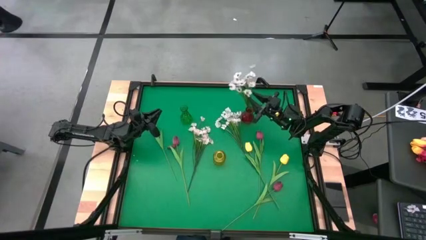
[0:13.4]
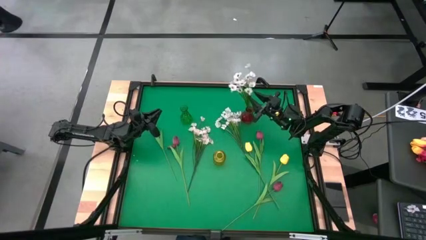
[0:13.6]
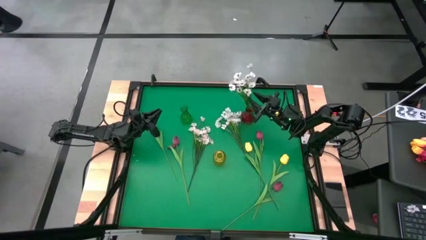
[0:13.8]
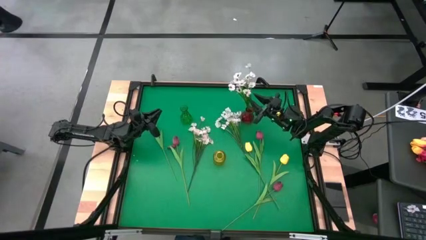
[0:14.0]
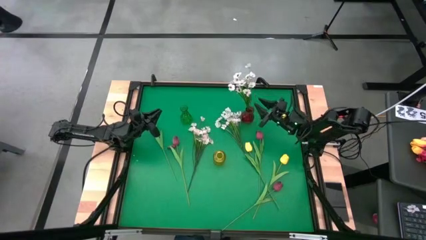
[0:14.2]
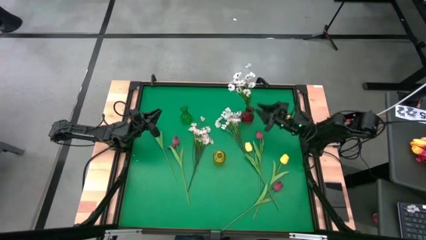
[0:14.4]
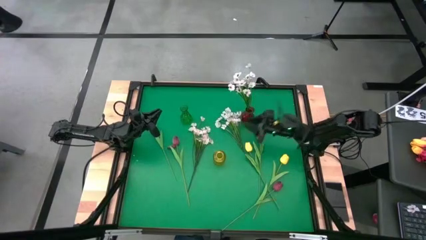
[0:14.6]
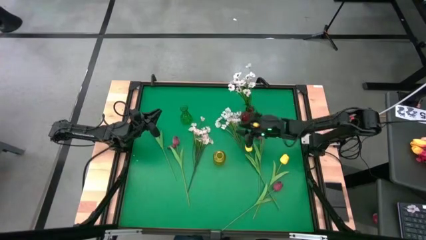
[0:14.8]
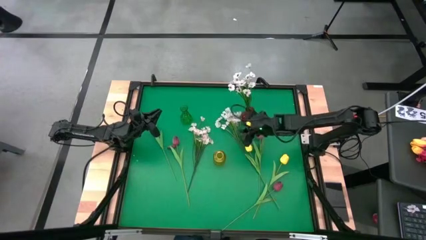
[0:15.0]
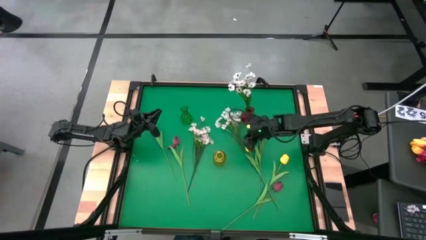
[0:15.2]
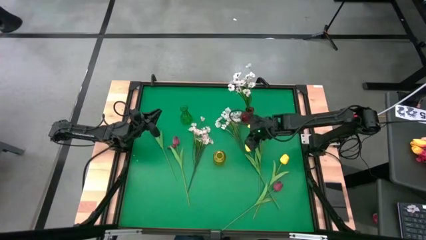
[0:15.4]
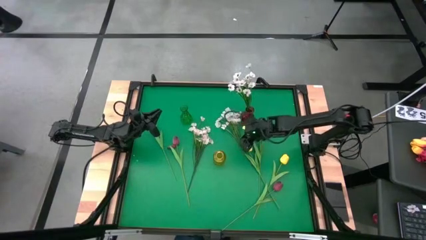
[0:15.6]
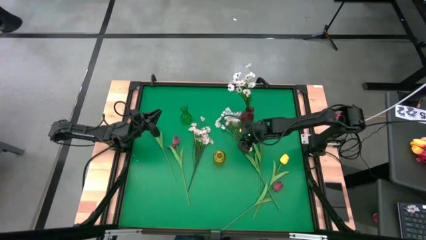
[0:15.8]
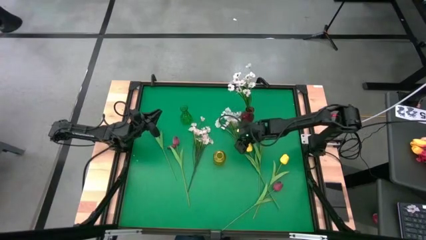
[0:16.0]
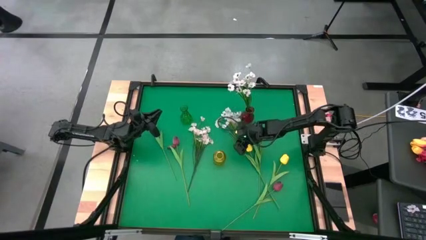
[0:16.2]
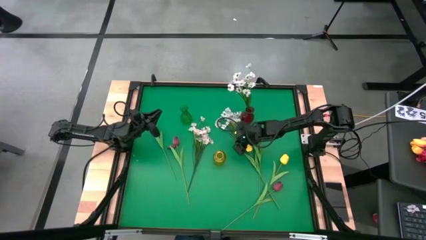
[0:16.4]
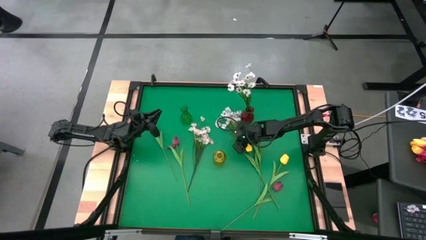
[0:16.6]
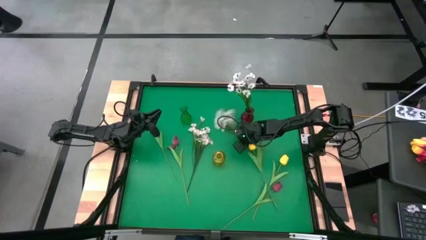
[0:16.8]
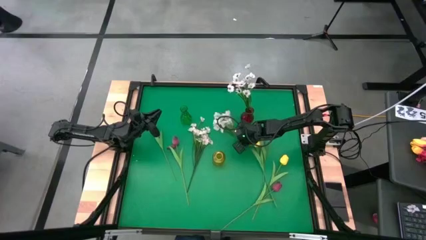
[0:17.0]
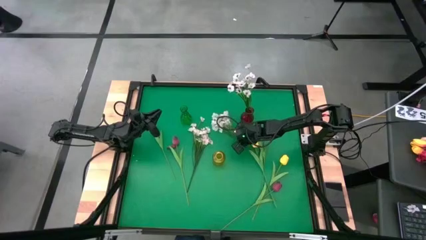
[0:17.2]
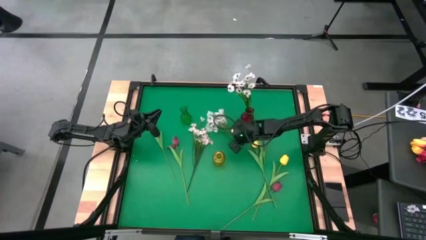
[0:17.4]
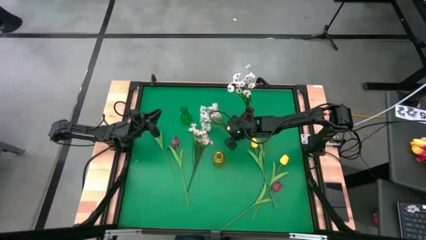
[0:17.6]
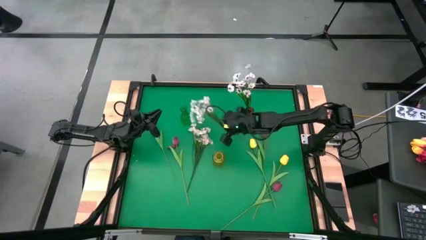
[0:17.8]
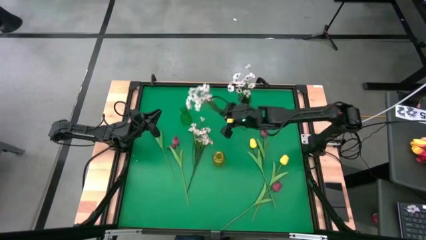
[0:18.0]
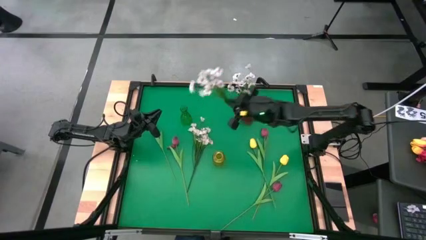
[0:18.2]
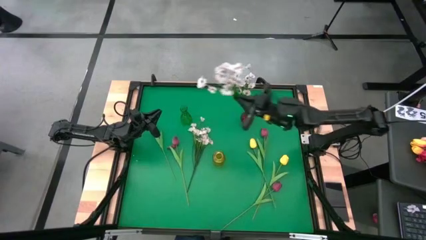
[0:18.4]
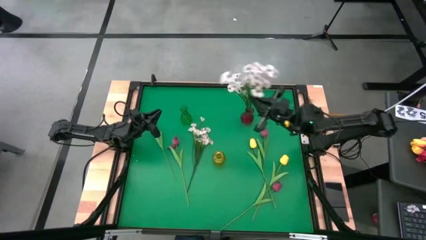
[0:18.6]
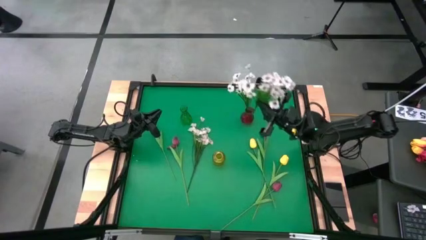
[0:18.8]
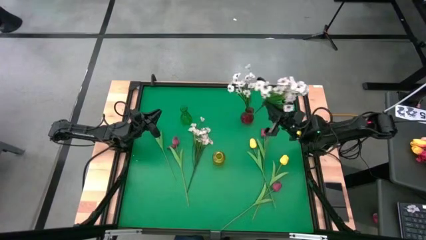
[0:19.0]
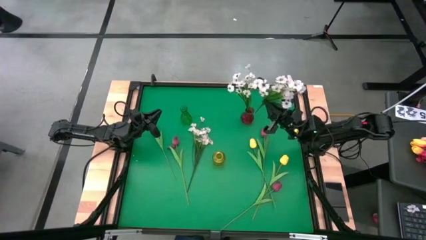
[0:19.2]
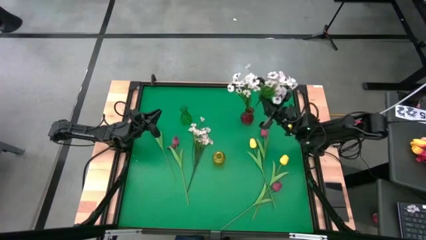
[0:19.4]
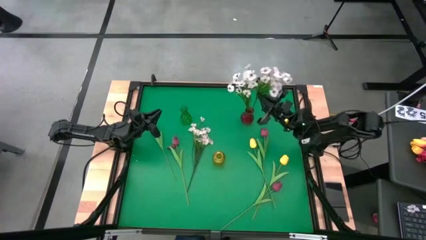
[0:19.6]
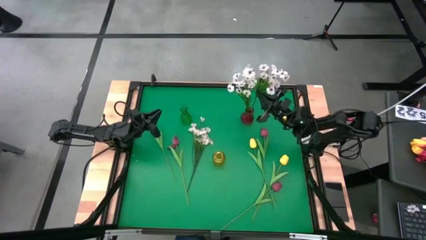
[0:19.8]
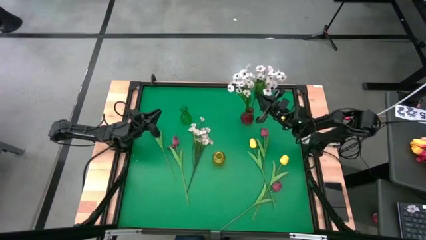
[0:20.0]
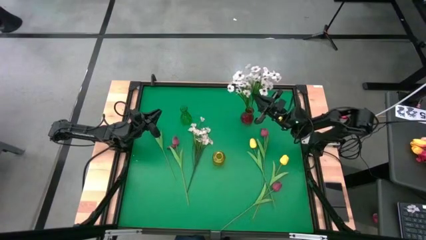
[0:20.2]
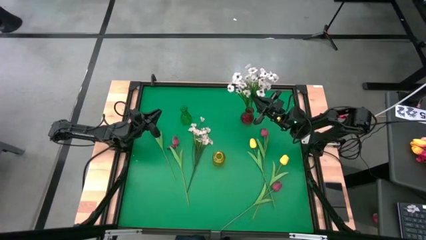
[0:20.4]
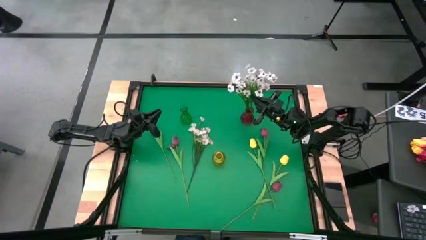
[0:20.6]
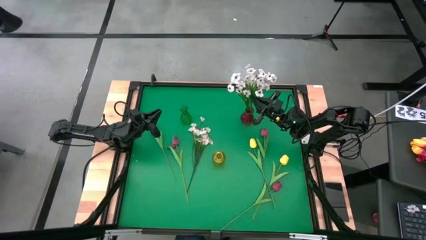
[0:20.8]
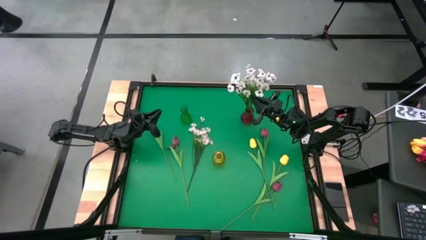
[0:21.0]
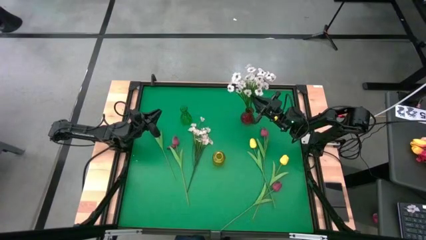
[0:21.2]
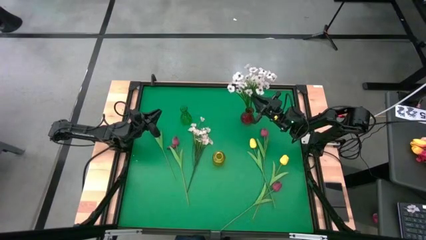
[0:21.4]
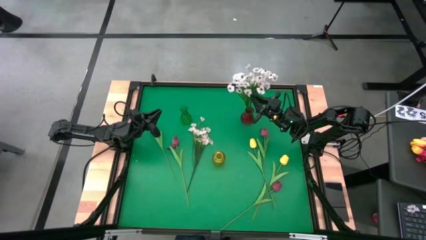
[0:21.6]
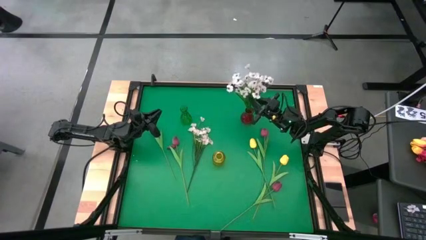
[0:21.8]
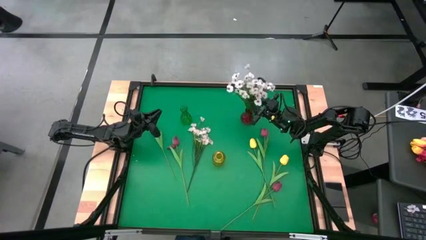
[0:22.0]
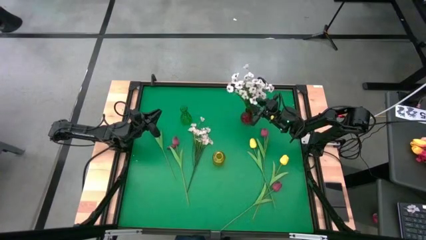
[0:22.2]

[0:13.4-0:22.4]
Task: Sort flowers into vase by color
Put the right white flower into the red vase

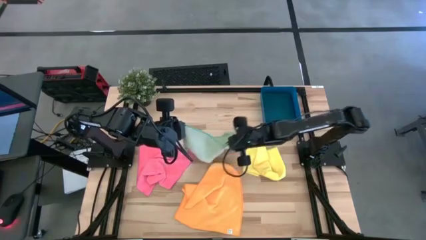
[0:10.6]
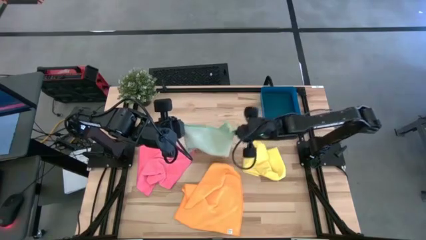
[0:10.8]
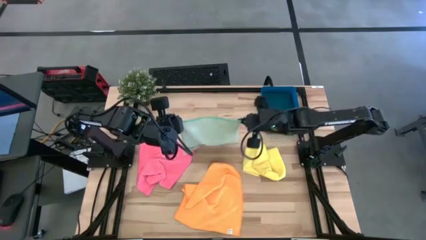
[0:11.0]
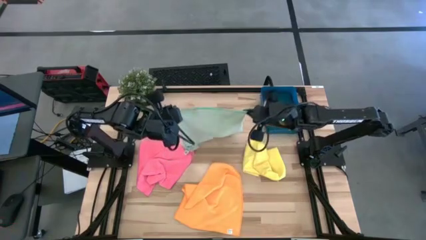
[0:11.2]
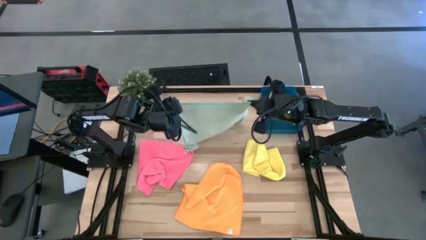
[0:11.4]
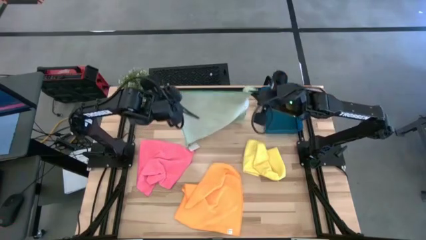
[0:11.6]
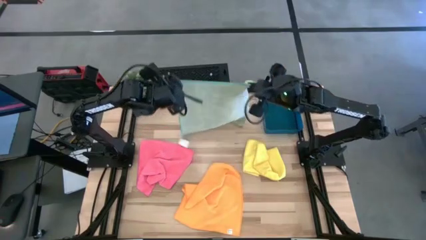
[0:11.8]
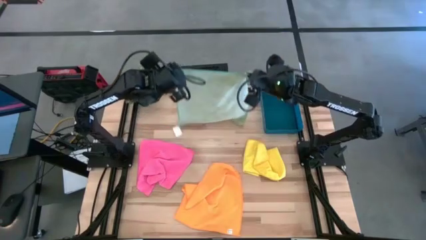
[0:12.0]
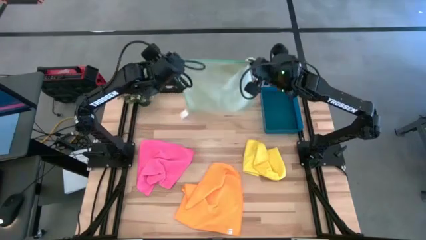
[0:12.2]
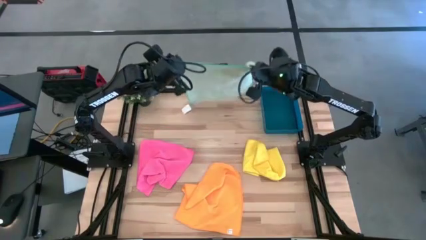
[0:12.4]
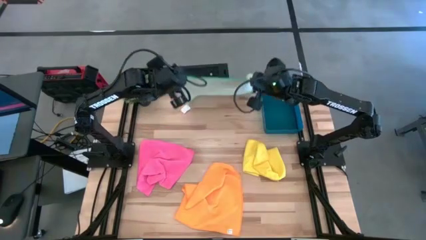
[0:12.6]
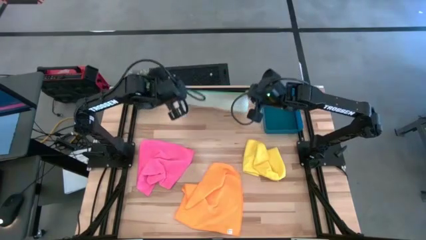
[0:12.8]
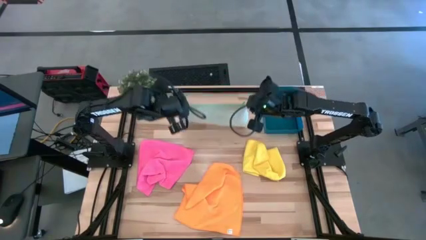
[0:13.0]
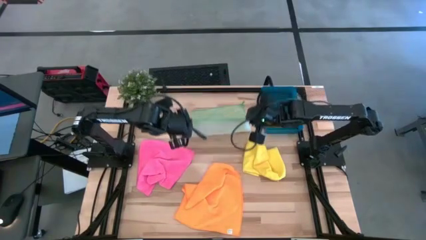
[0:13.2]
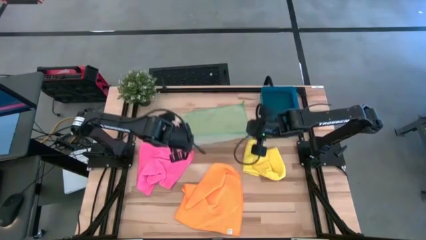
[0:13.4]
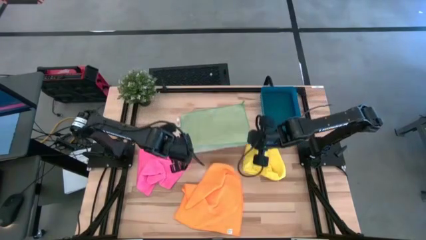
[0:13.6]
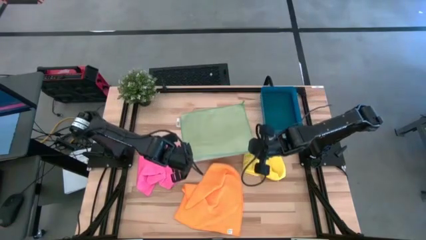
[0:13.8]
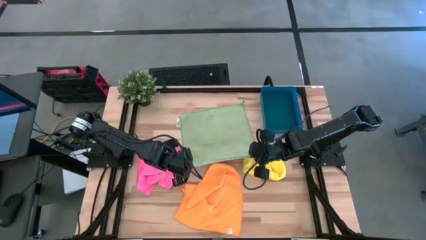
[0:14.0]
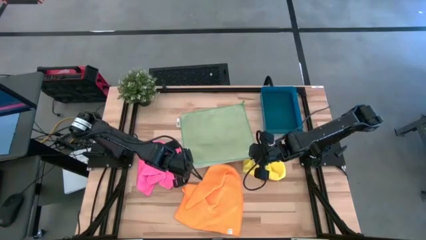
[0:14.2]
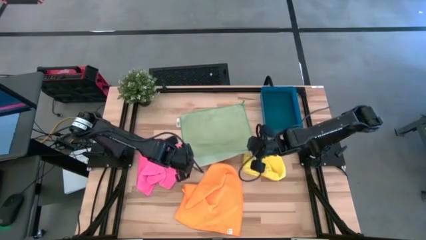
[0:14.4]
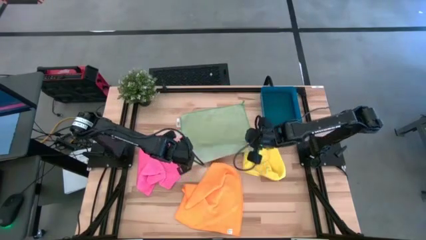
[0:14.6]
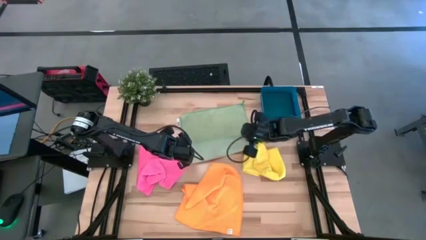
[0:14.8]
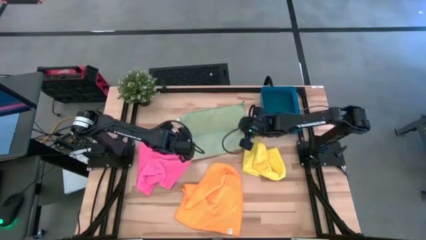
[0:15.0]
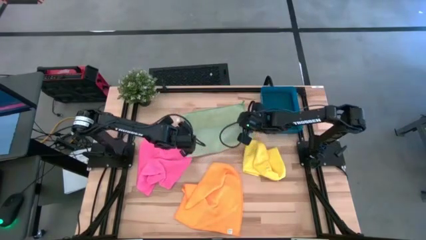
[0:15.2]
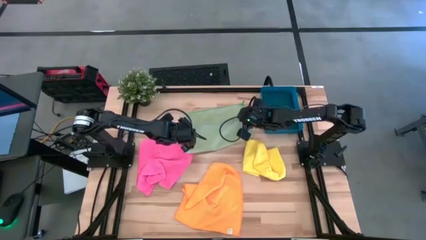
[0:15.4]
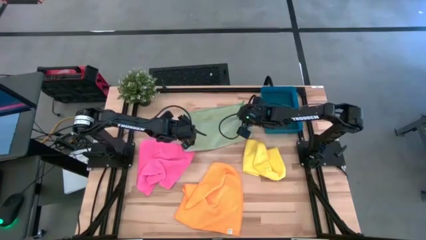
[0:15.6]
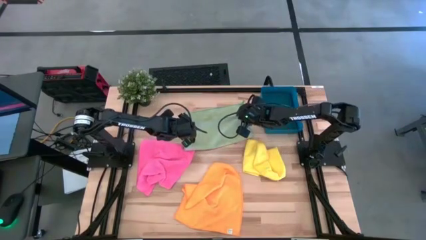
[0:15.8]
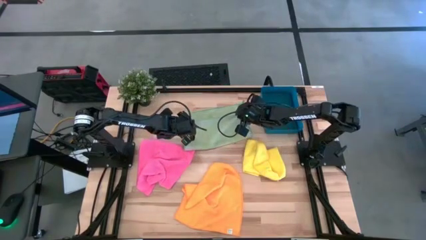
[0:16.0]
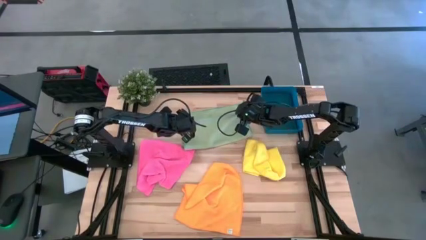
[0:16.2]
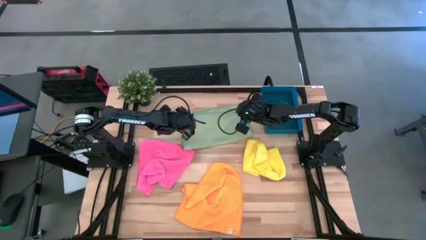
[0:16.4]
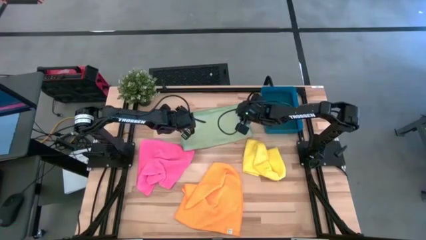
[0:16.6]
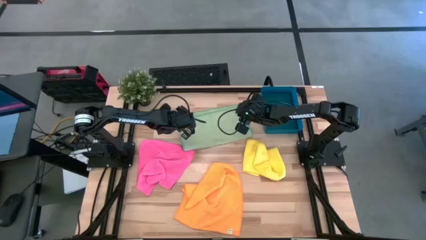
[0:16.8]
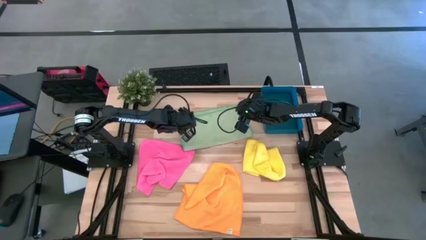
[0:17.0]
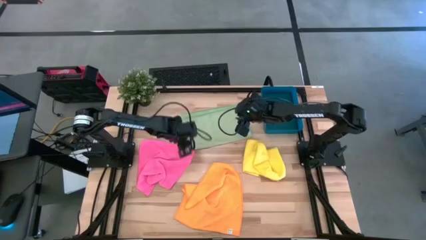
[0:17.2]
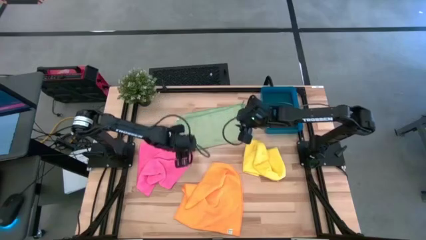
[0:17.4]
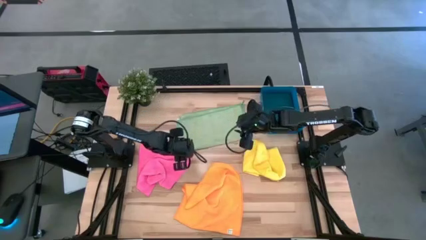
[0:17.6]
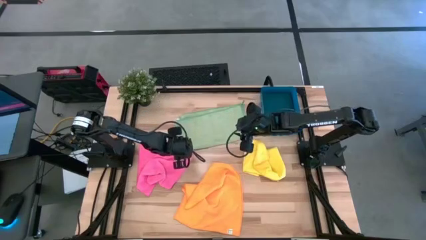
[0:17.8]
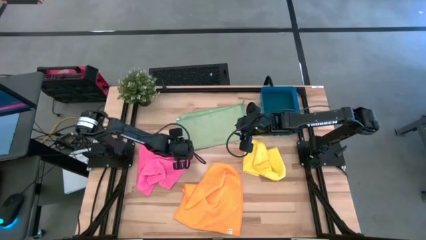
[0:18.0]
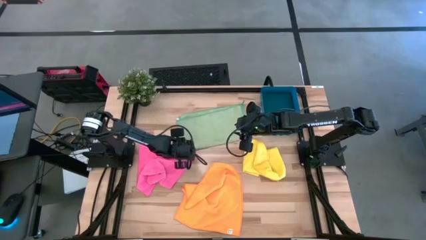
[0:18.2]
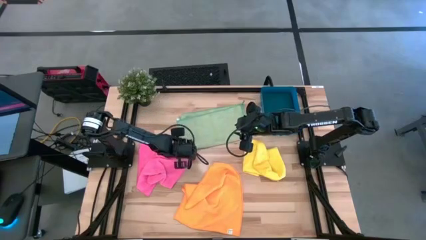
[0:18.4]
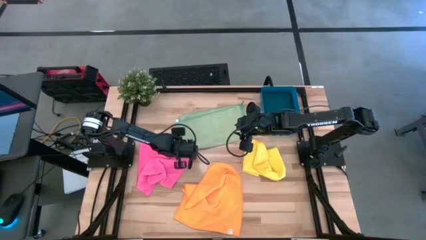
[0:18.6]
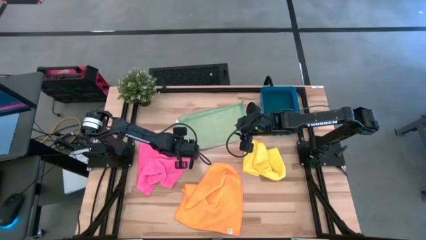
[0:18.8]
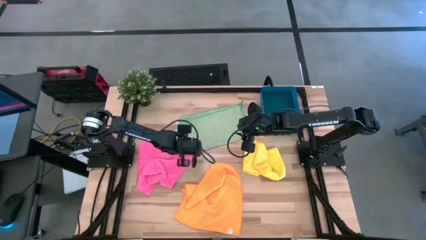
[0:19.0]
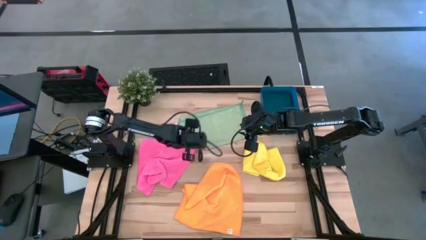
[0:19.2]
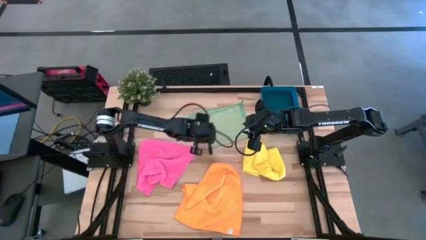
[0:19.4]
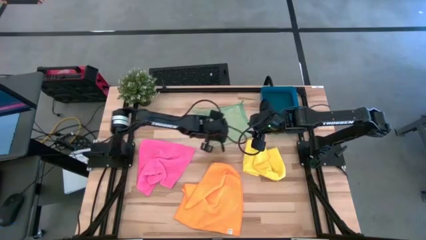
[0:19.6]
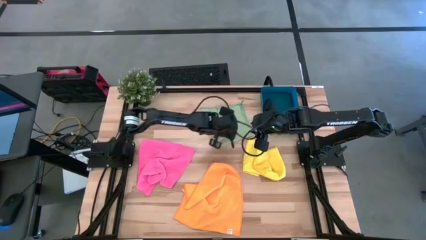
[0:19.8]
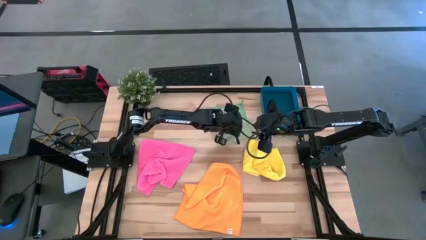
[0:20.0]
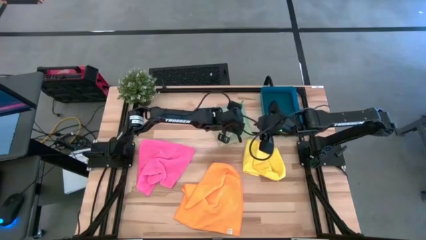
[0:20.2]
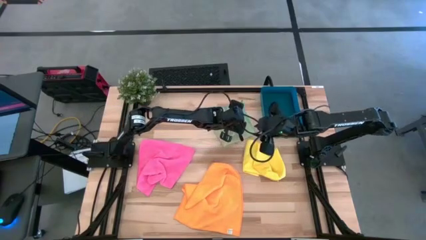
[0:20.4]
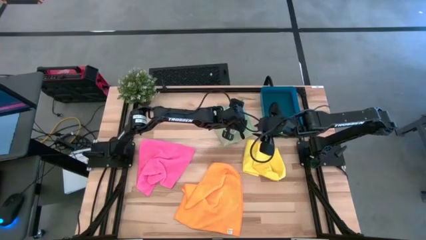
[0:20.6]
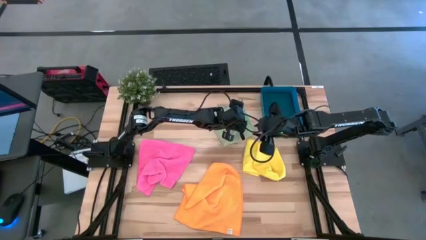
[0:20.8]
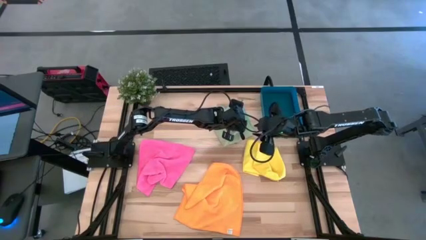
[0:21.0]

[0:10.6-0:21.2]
Task: Fold microfiber towels
Fold the green microfiber towel
